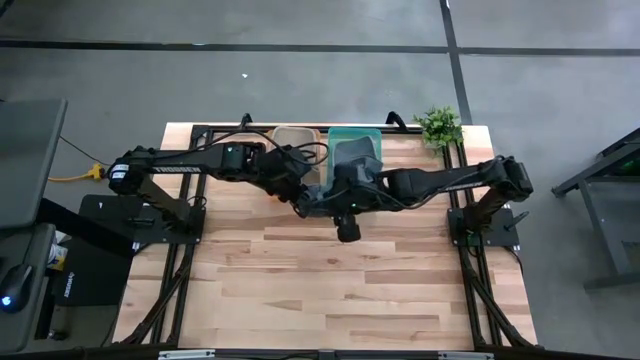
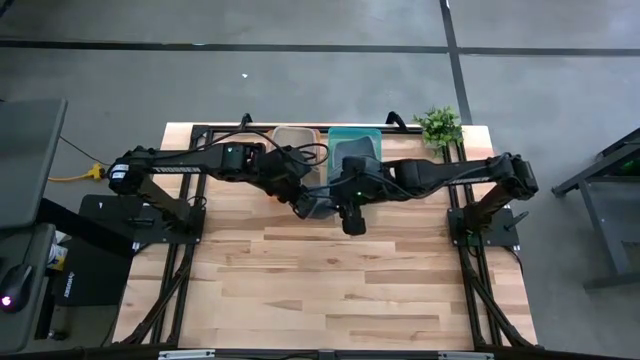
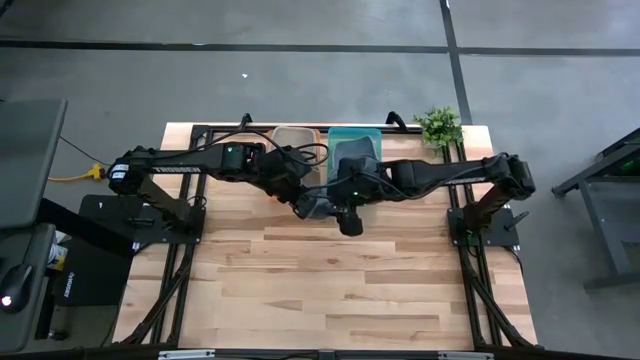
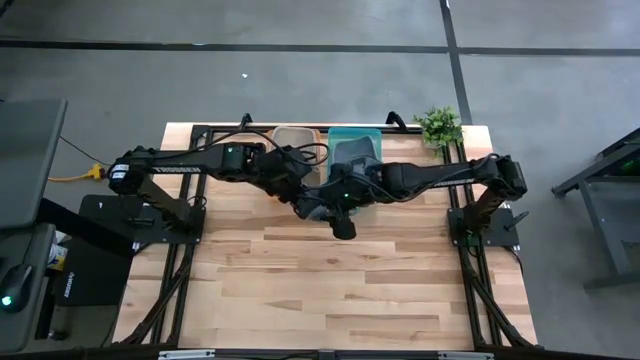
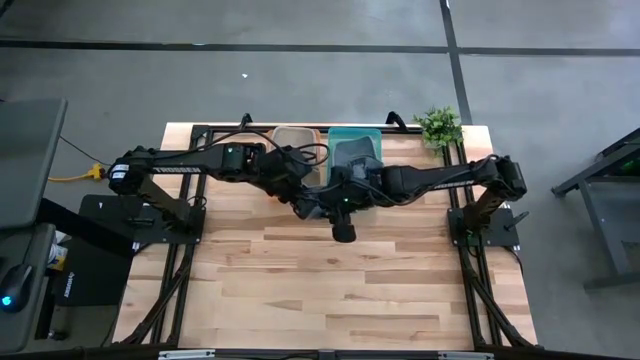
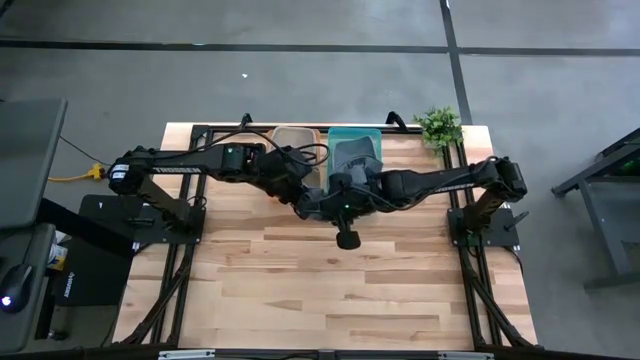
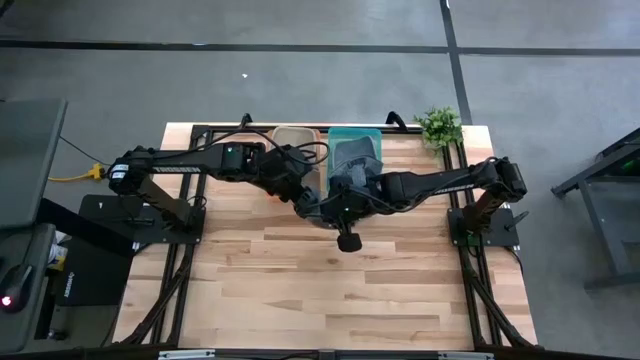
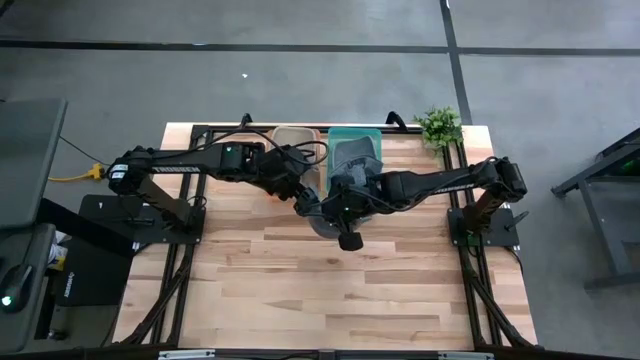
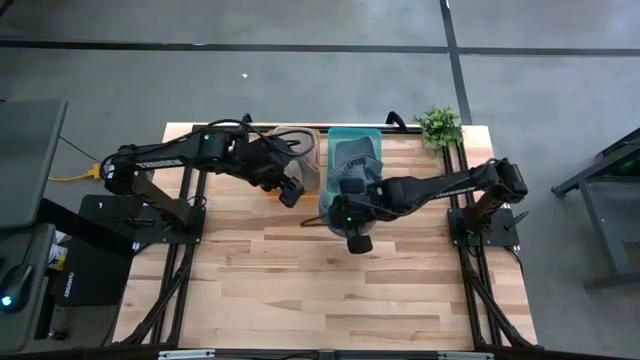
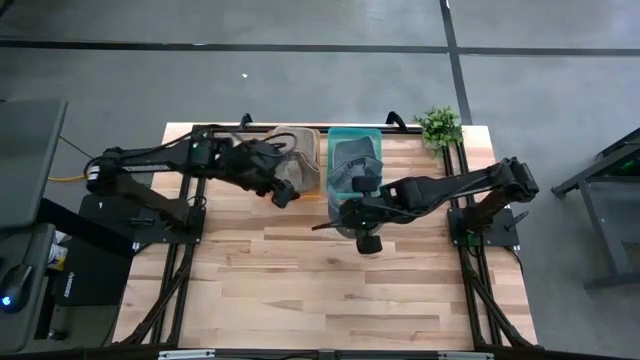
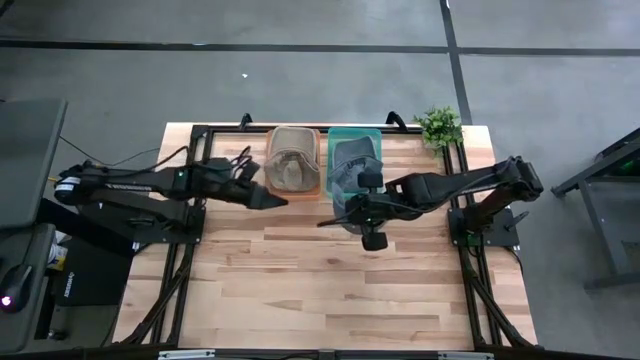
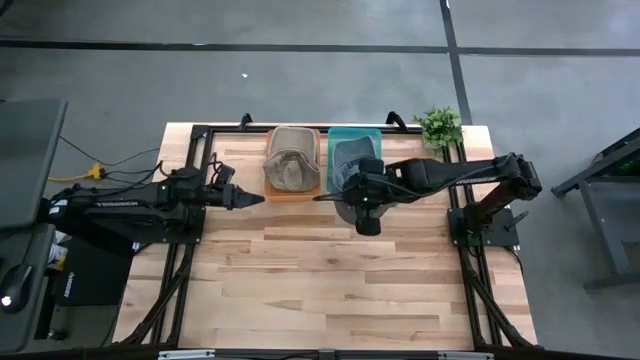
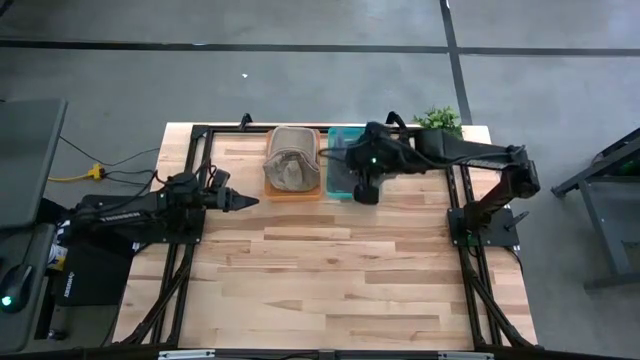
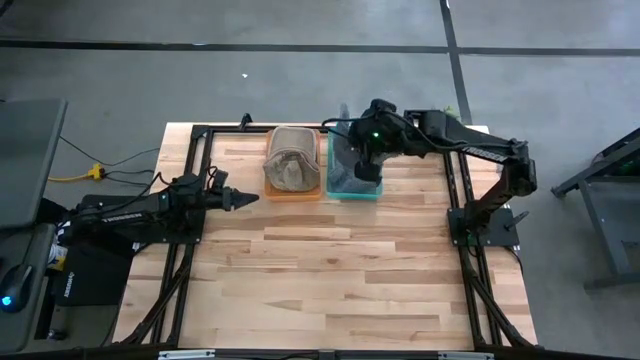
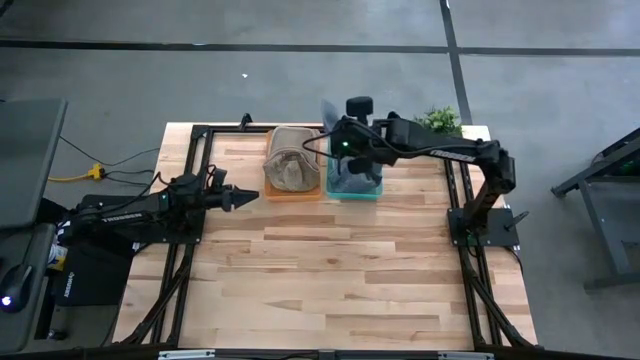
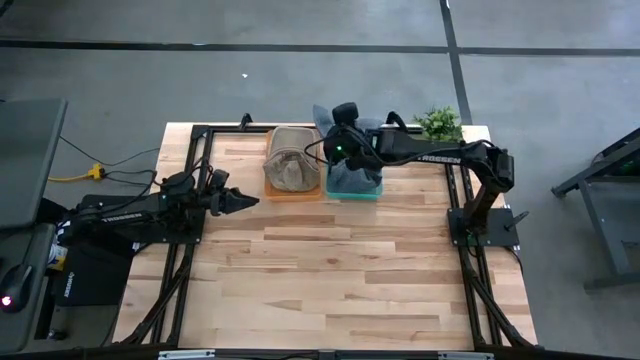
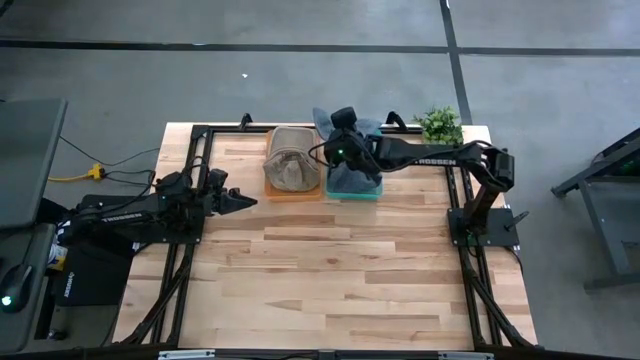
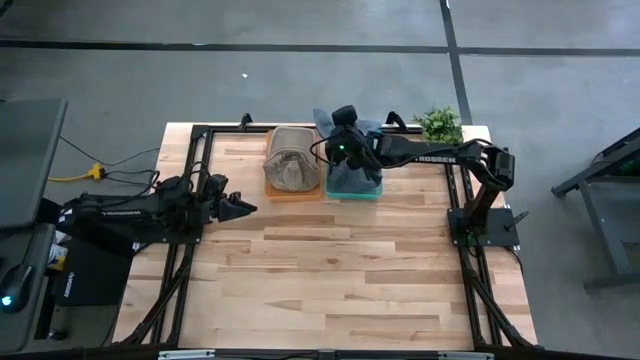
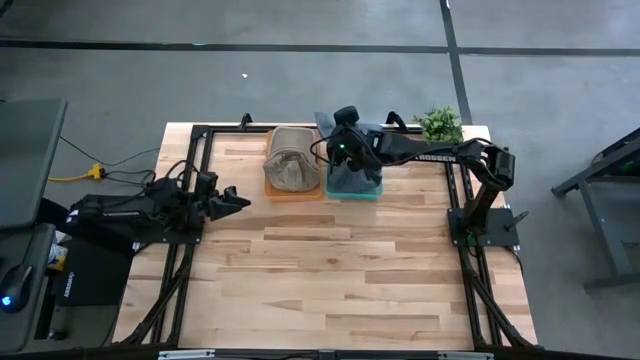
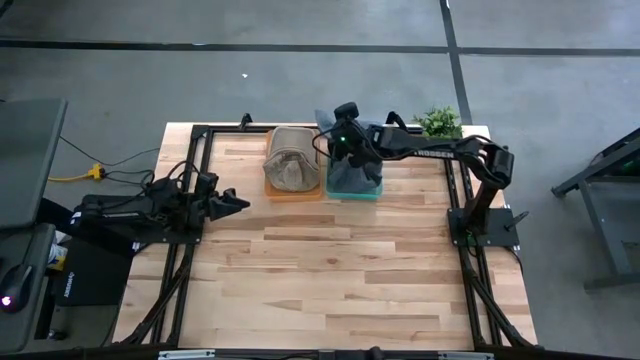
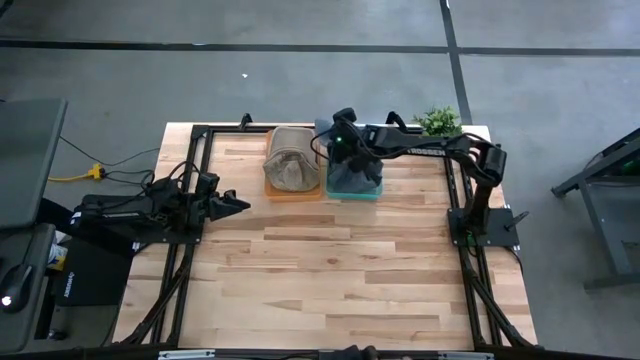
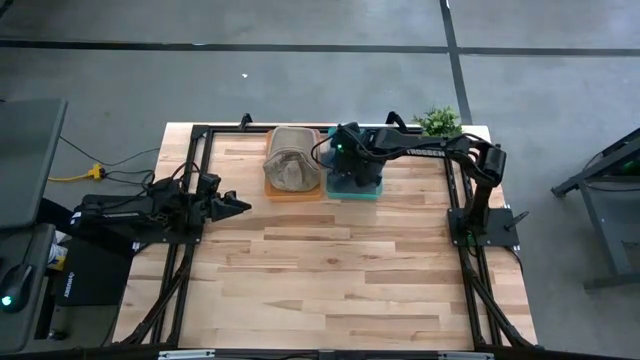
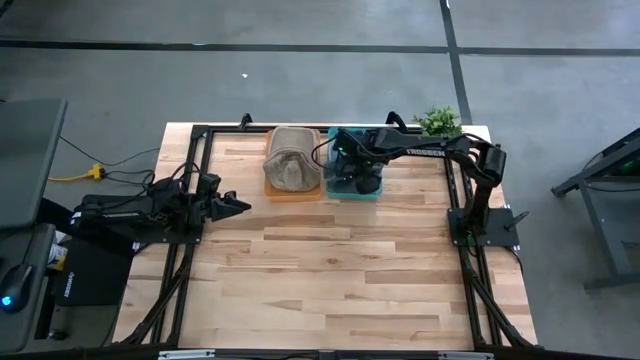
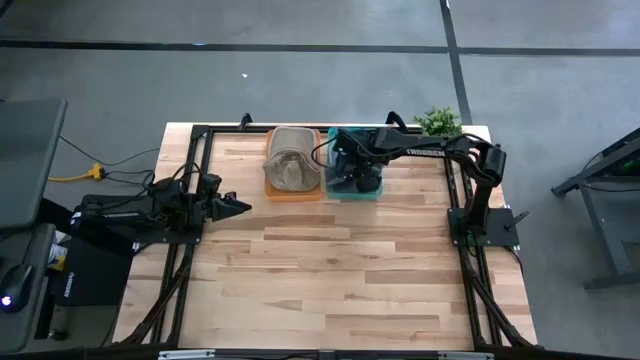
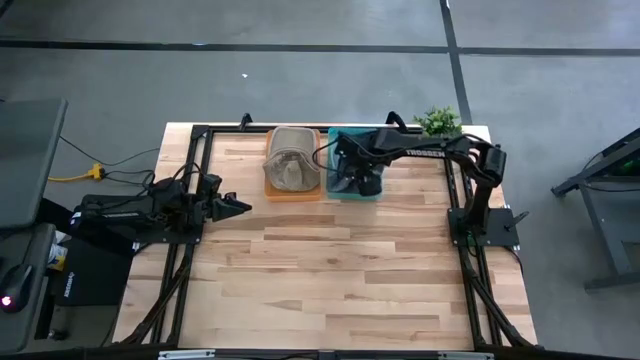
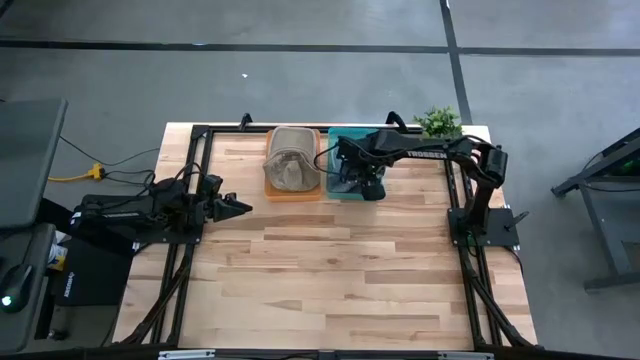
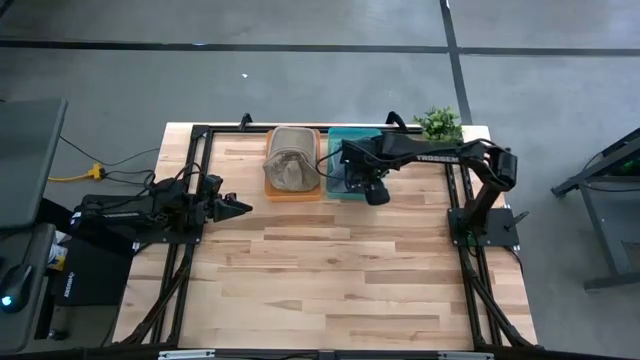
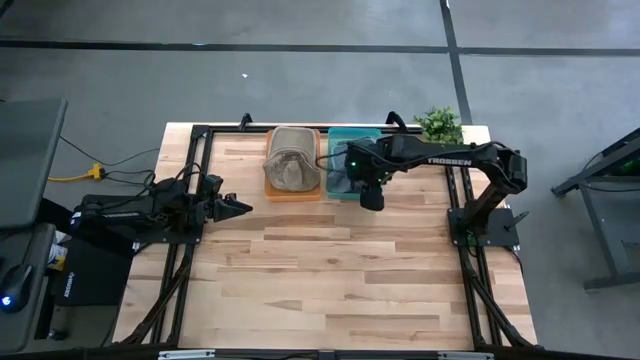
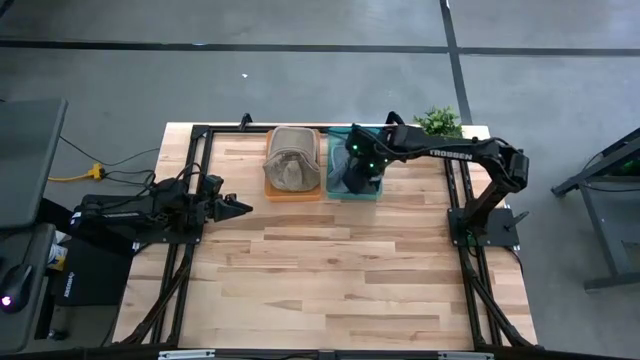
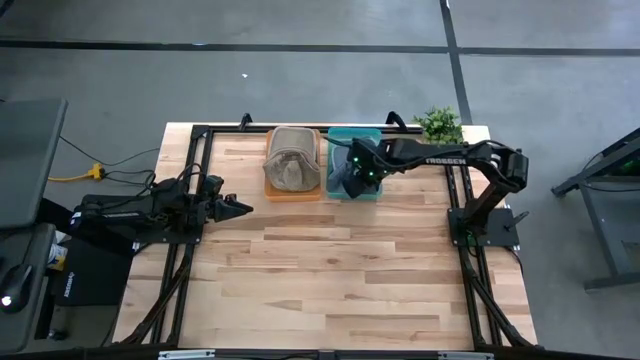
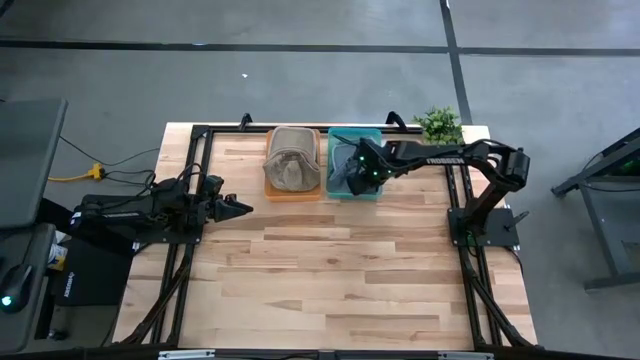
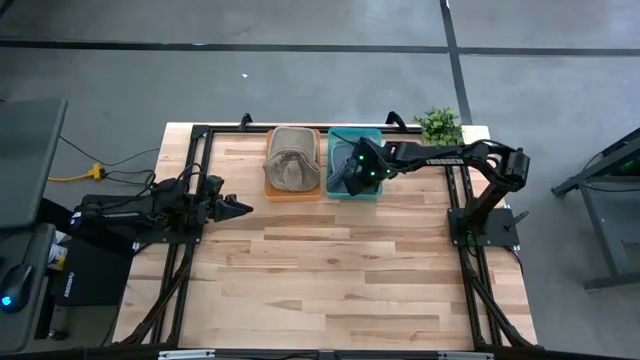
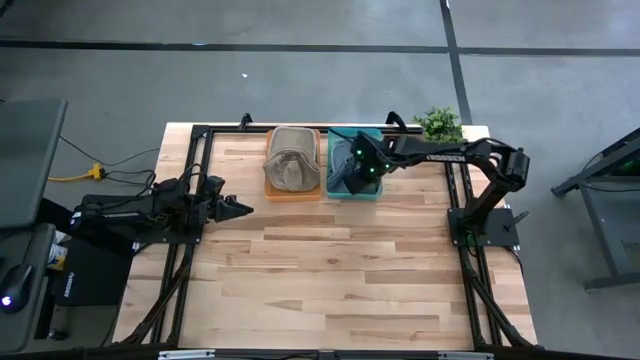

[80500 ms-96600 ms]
Task: Pick & Place hat
Put the black cap into the blue bin

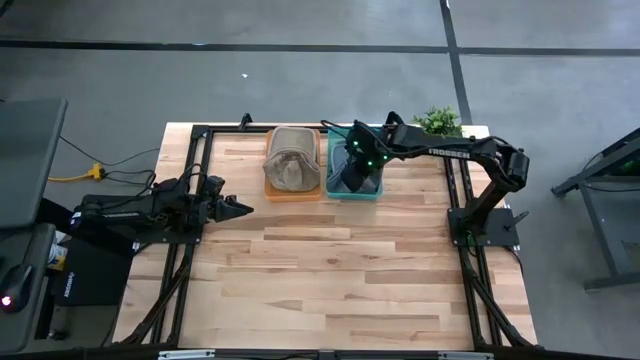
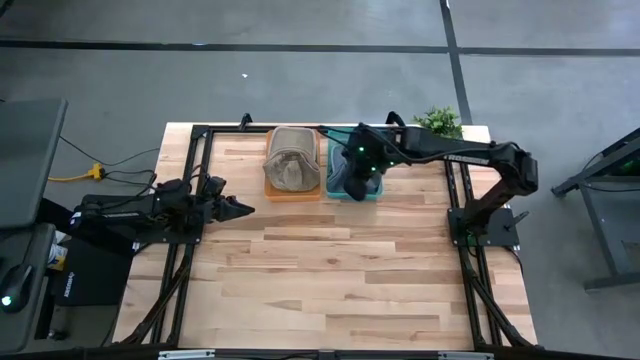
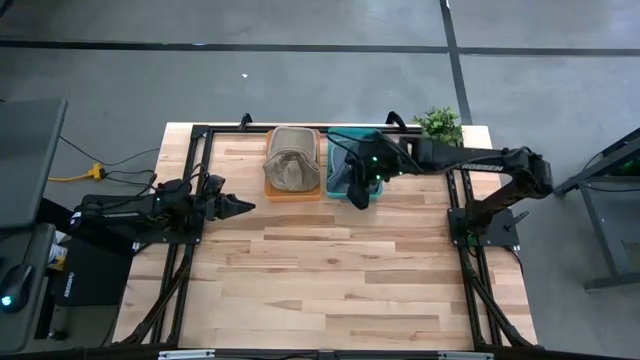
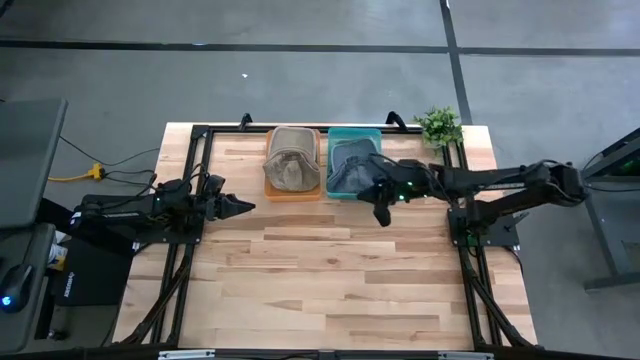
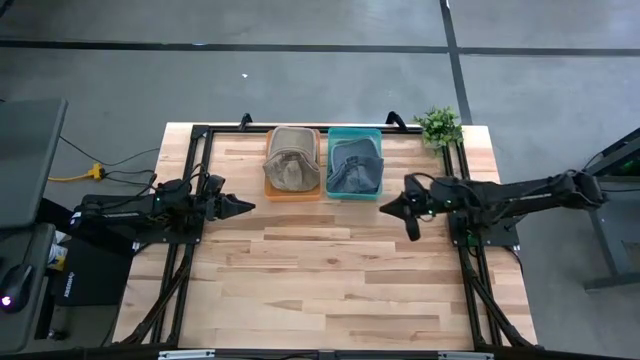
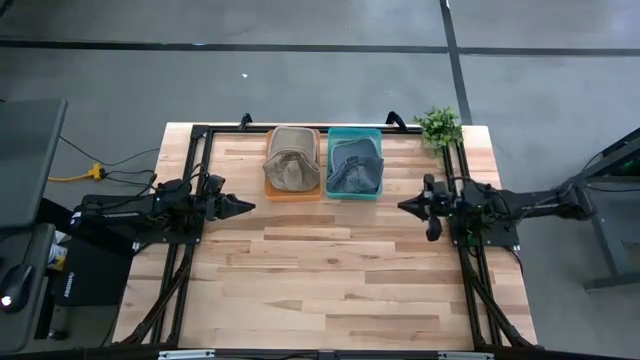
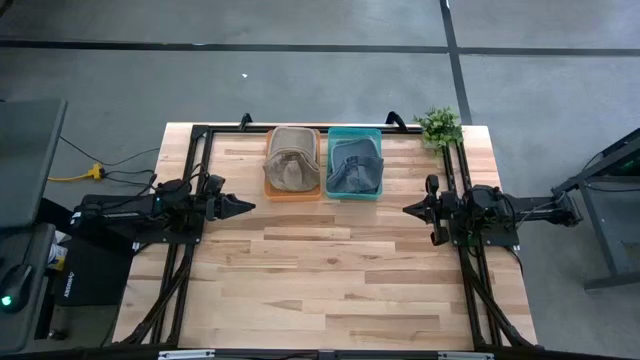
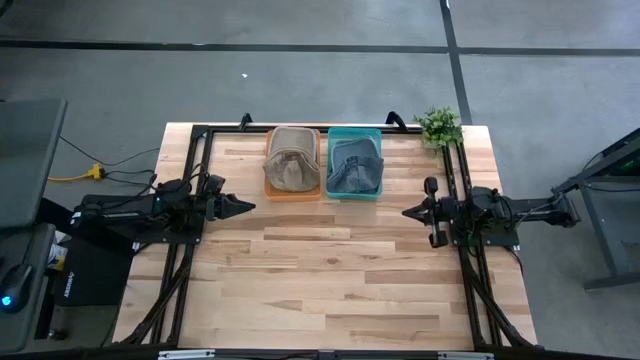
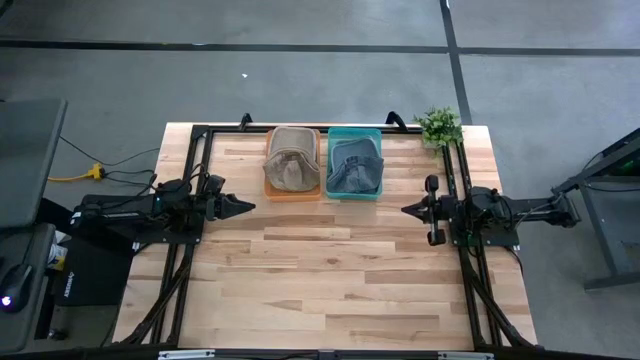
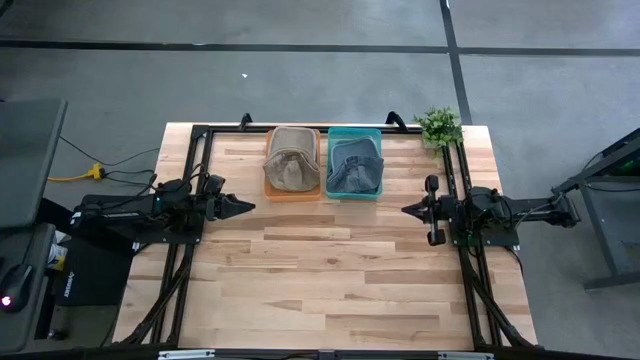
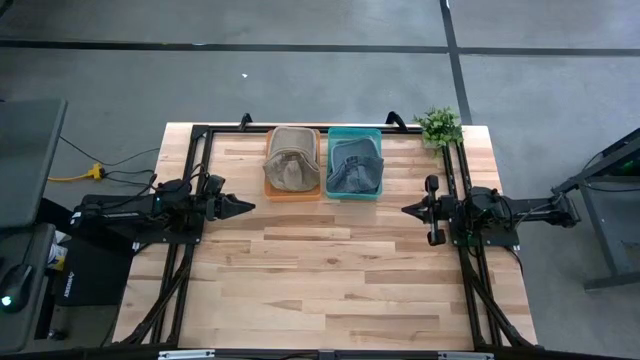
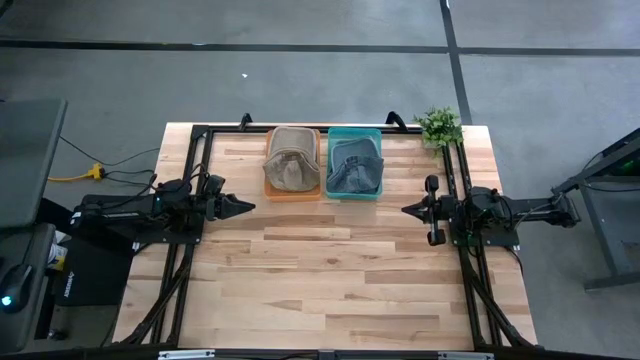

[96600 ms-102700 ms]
Return to Home Position
